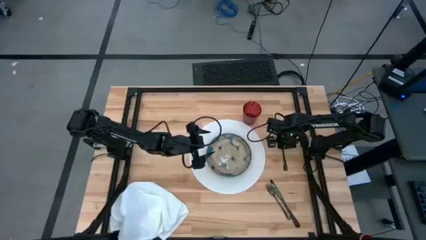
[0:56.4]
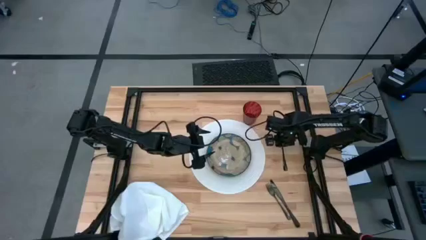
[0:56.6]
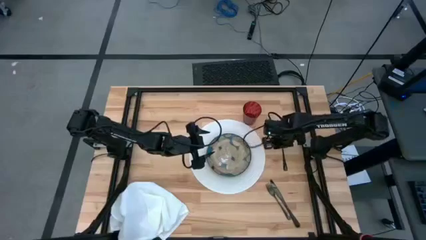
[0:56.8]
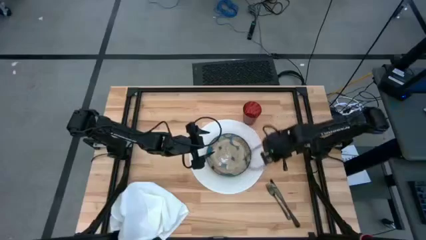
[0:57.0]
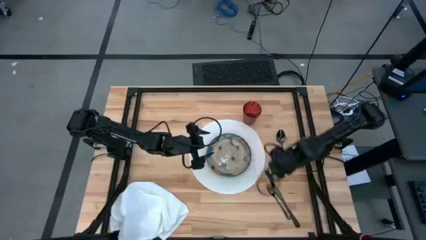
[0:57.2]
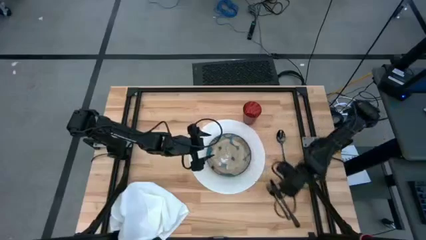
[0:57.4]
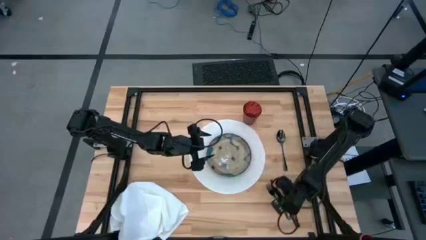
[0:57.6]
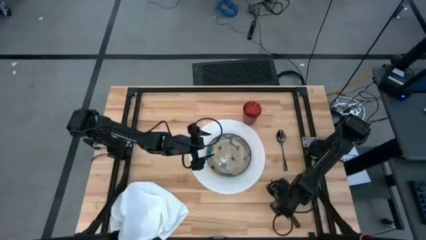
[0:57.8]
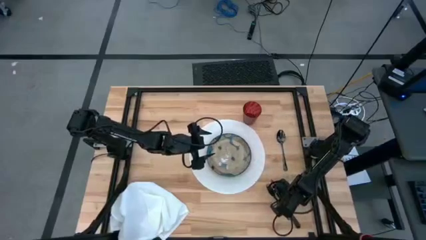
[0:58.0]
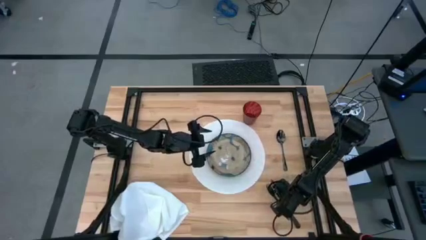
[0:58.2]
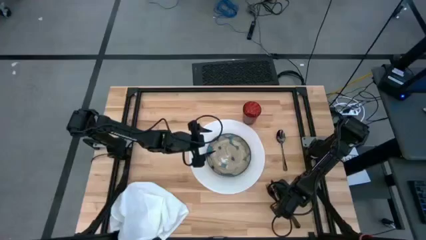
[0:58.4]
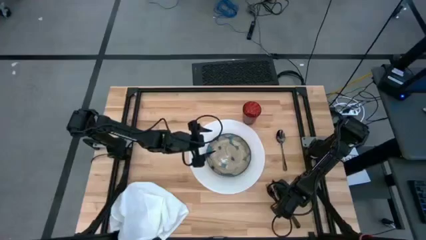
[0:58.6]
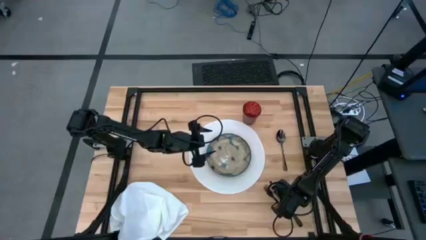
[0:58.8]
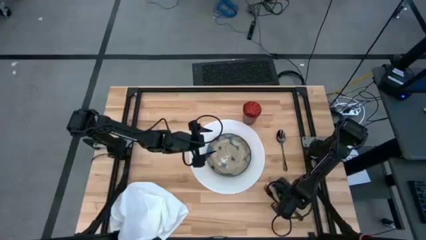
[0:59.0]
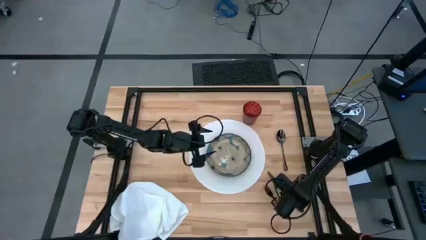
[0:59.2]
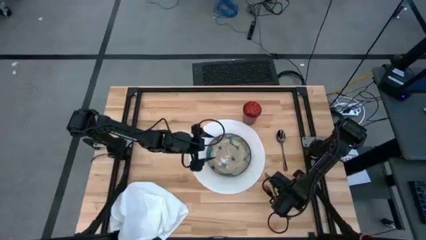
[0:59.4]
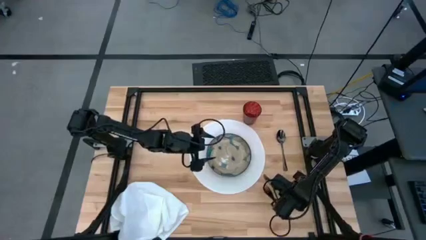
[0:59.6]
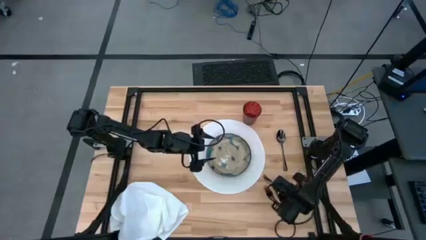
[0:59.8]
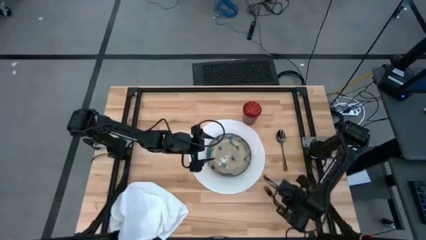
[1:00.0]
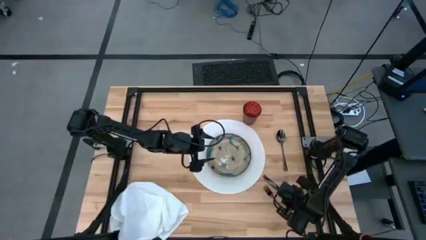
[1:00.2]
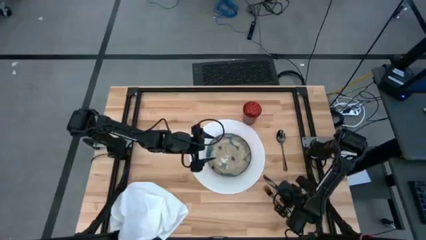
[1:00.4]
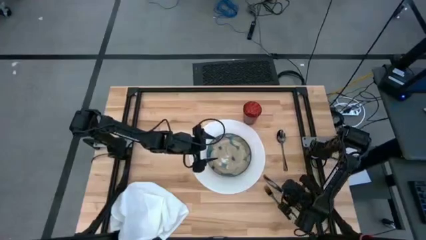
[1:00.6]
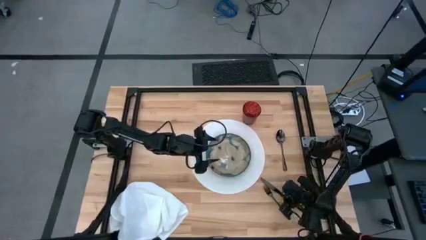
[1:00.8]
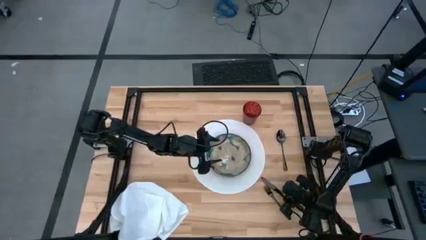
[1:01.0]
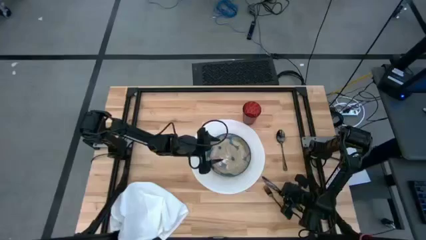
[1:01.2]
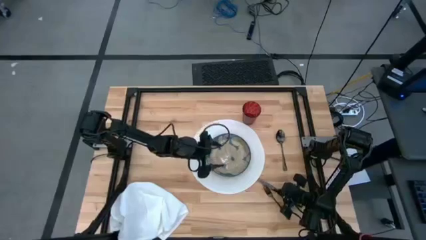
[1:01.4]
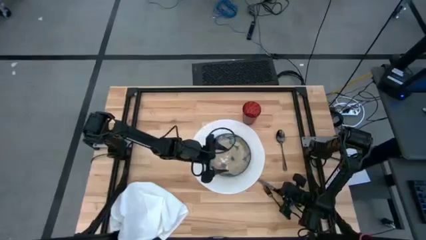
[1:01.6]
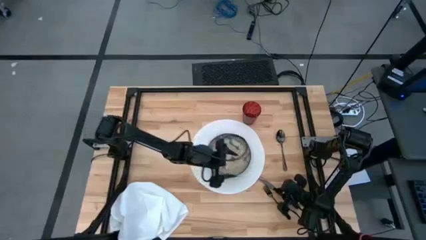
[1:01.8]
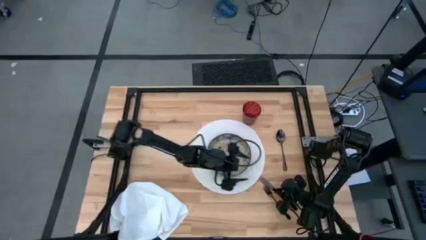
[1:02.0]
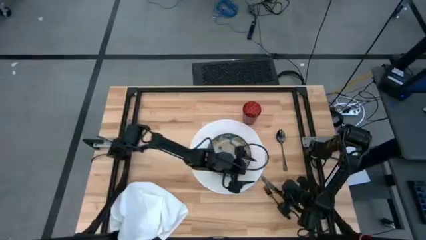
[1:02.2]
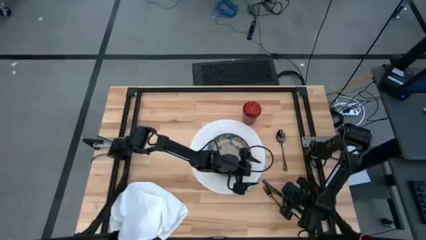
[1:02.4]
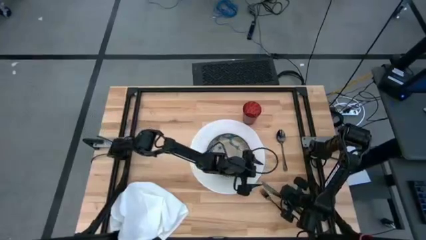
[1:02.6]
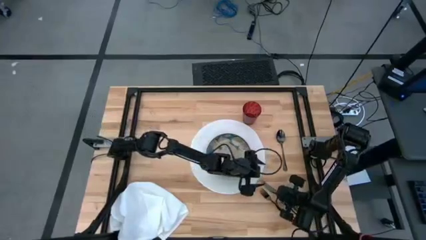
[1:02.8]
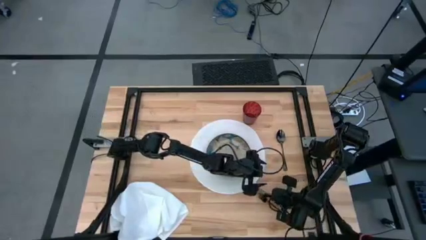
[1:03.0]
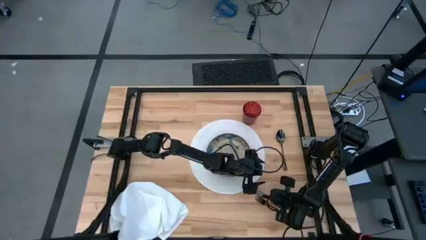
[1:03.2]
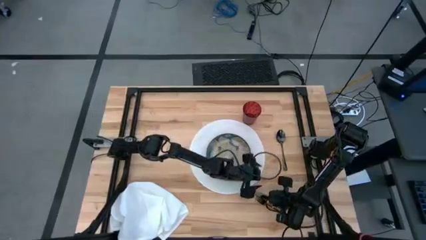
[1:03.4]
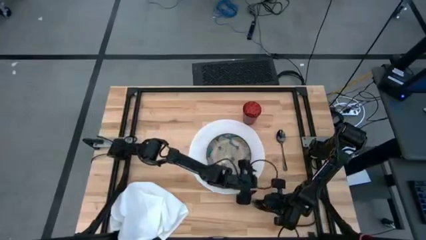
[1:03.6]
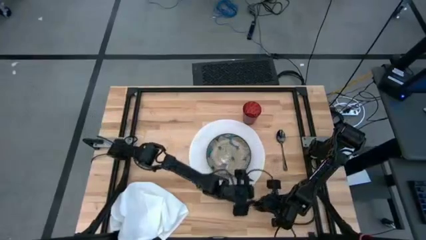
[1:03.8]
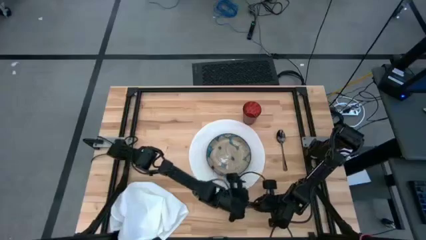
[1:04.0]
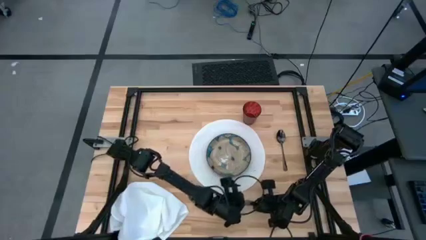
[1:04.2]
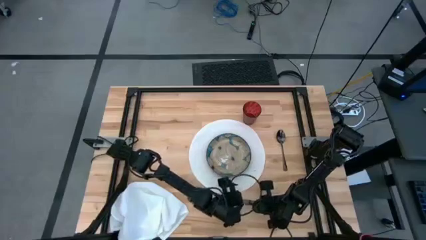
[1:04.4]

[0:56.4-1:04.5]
Task: Set table place
Move the knife to the middle right of the table

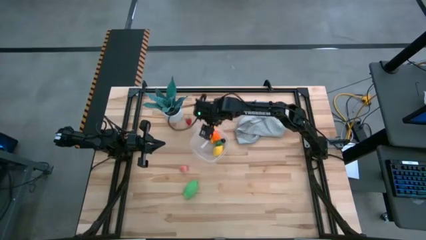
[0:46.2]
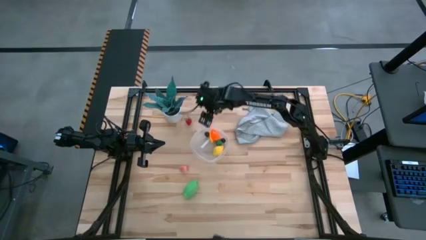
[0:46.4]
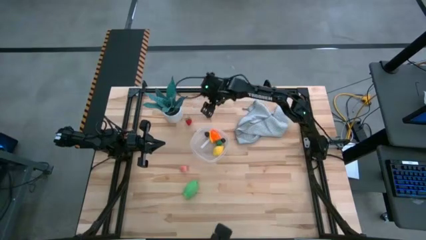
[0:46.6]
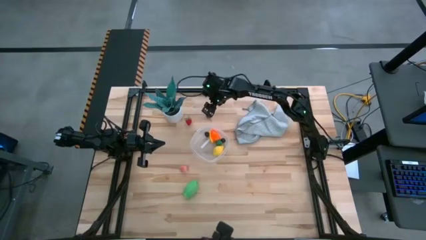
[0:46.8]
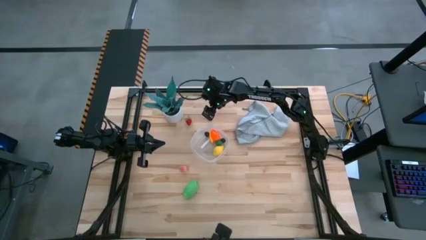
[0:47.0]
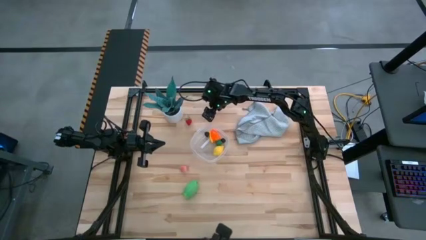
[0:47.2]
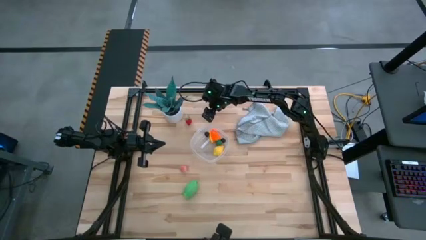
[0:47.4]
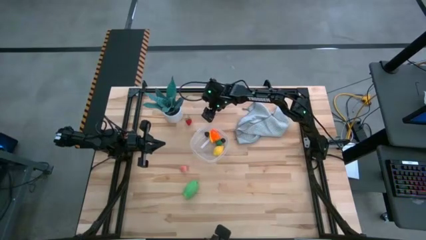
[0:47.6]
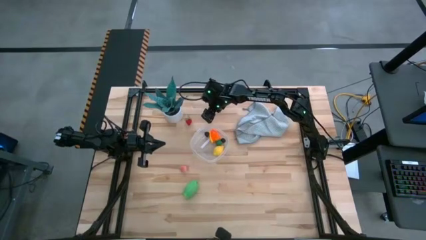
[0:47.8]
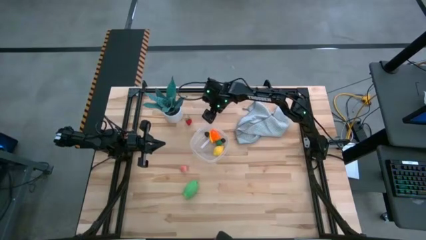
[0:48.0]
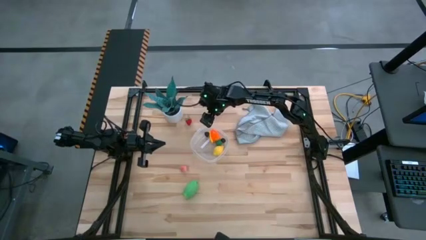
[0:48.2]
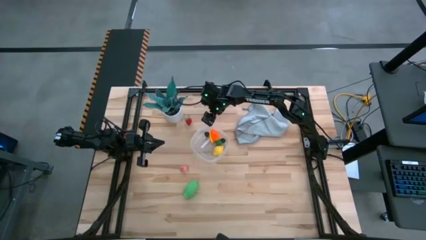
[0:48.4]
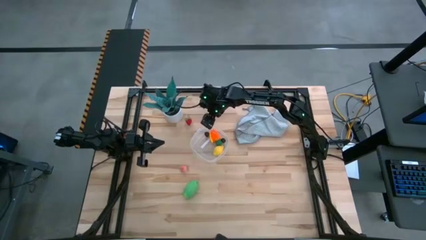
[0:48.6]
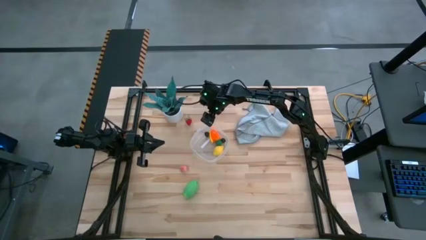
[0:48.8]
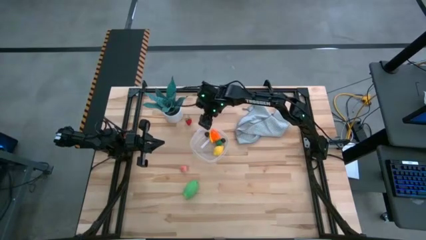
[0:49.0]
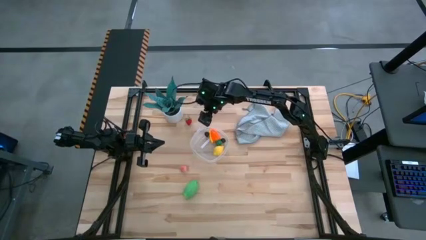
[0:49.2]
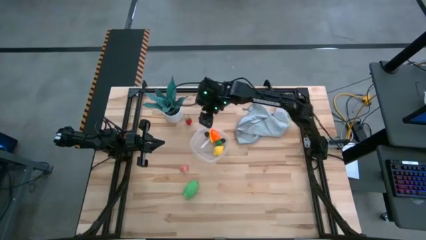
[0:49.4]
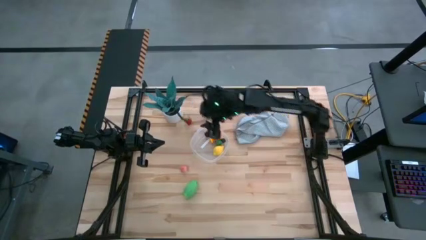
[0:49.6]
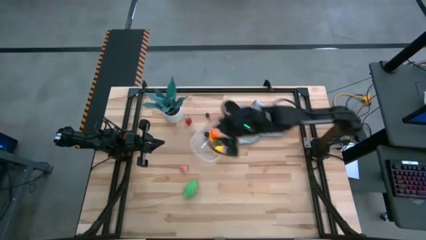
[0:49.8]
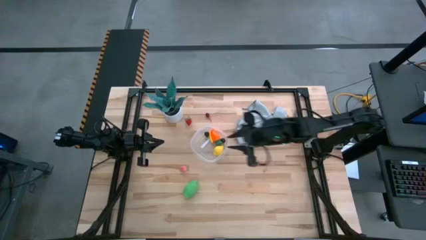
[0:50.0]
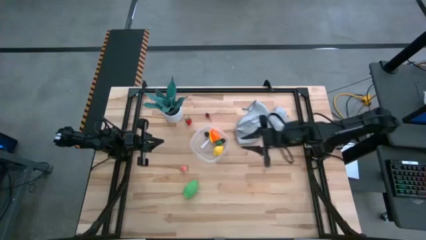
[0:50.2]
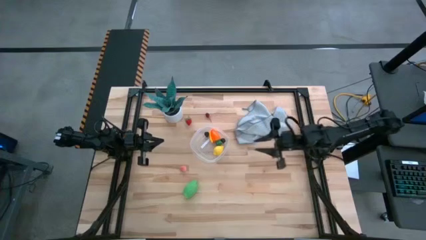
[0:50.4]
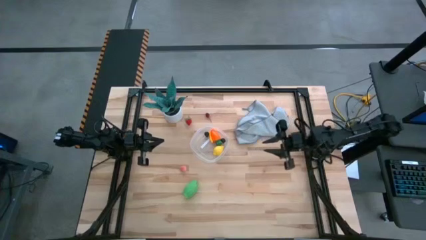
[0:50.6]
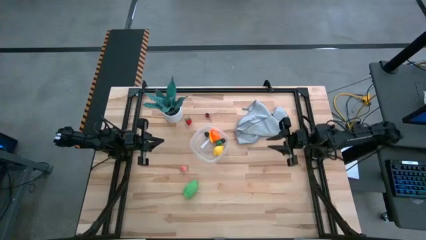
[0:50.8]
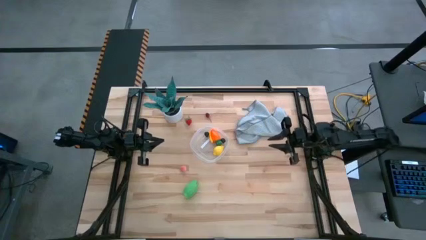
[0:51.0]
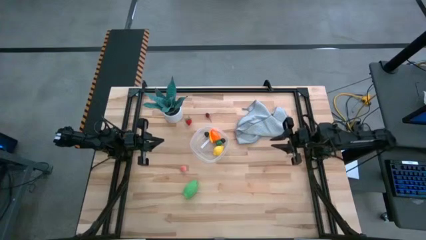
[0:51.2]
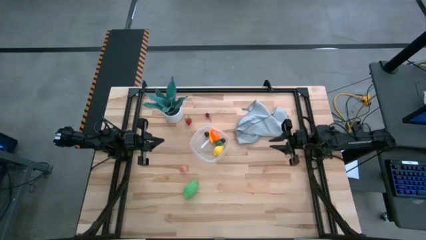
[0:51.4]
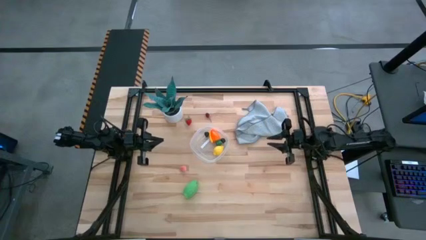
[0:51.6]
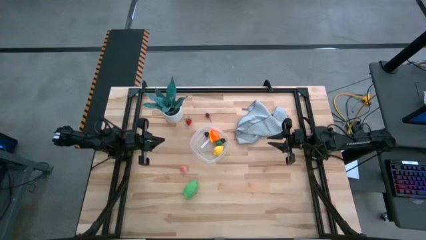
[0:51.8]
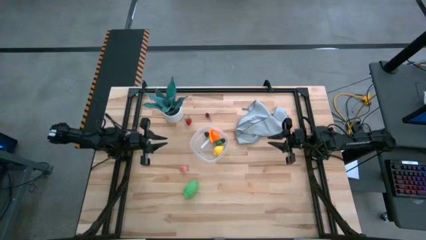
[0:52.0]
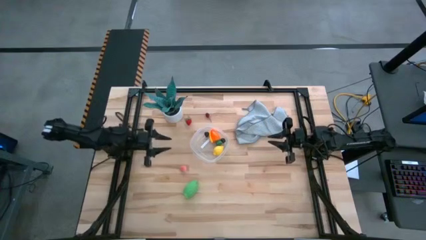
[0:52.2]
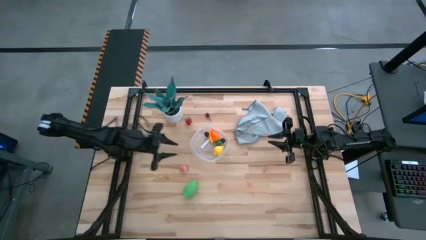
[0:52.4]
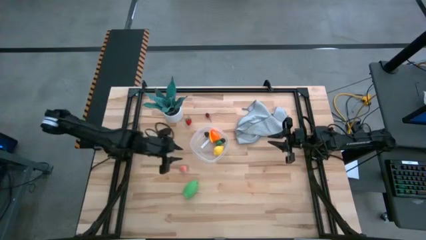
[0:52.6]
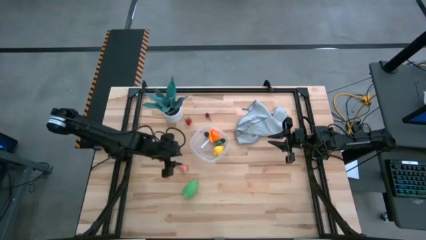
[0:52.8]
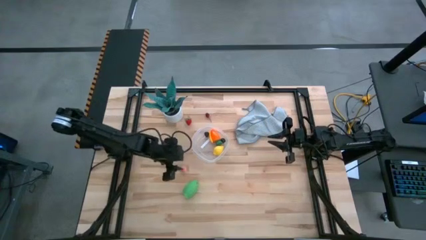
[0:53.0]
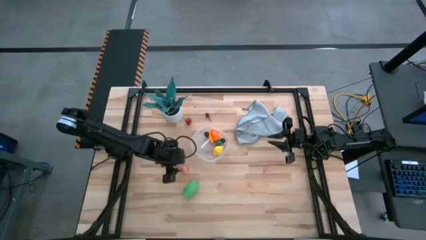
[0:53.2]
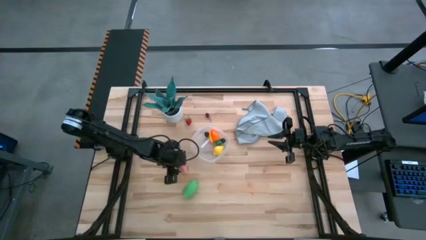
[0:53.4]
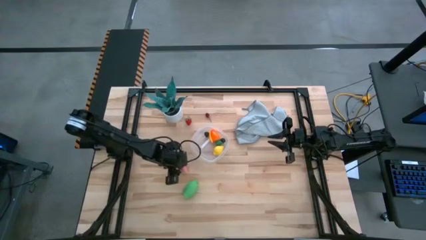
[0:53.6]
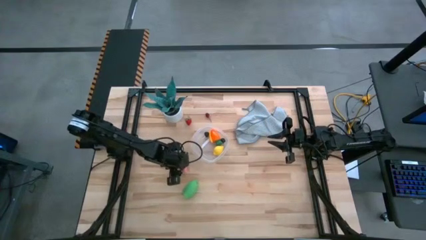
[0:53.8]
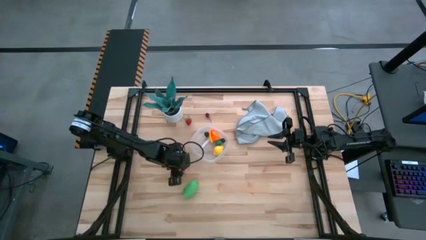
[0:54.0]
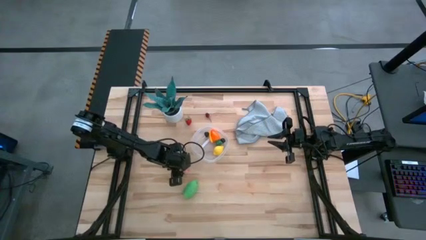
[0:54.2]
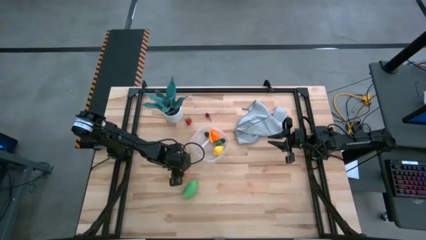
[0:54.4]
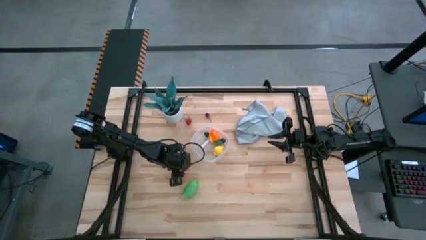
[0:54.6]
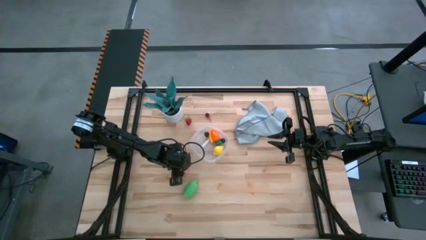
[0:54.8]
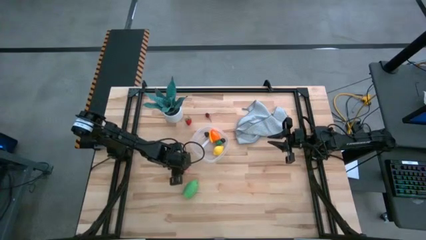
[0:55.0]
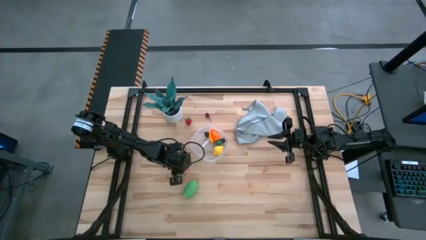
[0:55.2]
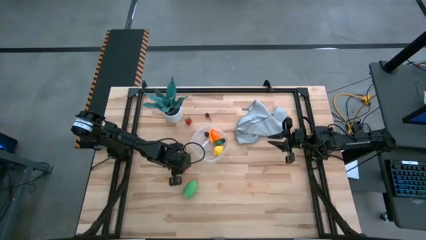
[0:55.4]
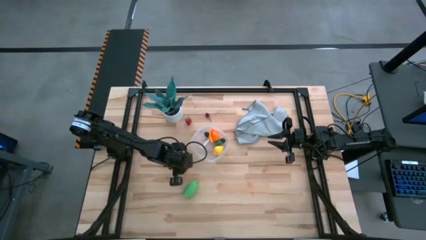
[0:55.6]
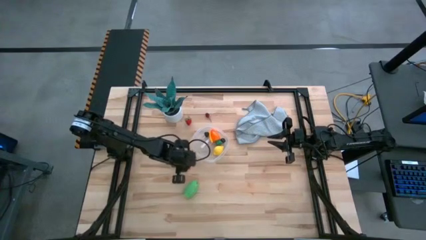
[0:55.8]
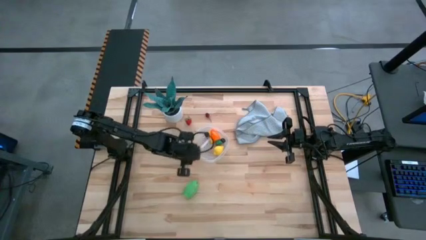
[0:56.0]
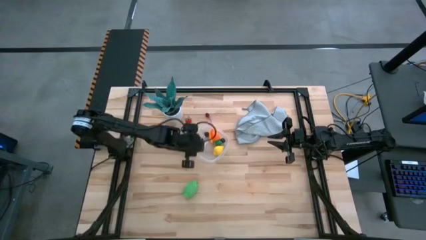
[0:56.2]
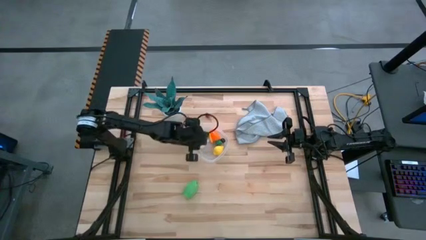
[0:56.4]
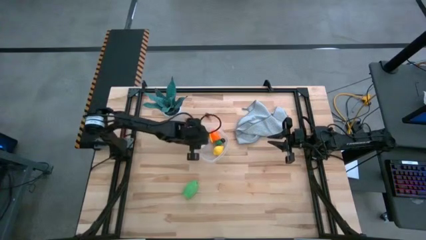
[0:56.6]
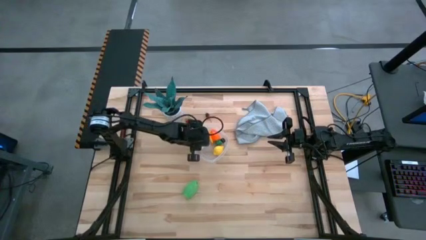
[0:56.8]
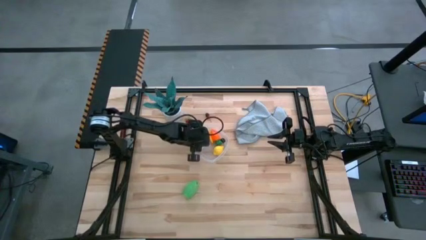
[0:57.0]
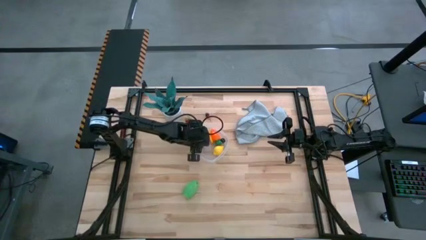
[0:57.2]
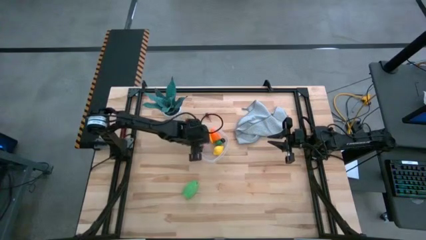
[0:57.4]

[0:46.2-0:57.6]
Task: Pick and placing Produce into tupperware
Put the pink peach into the transparent bin
